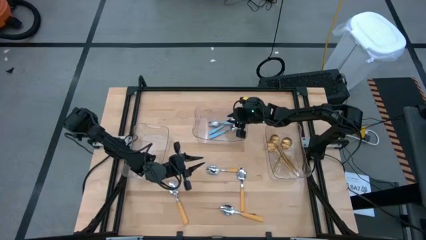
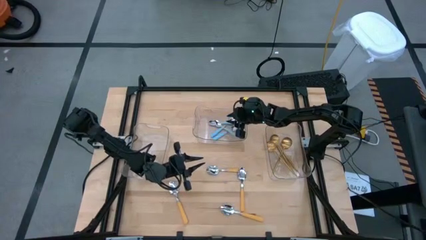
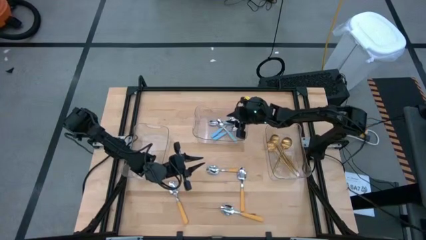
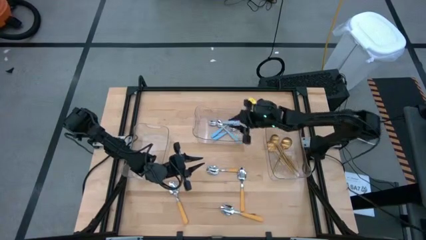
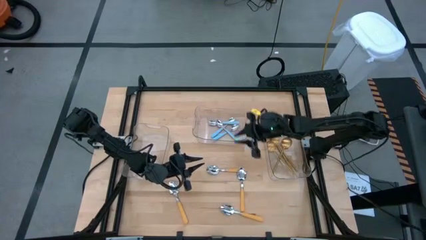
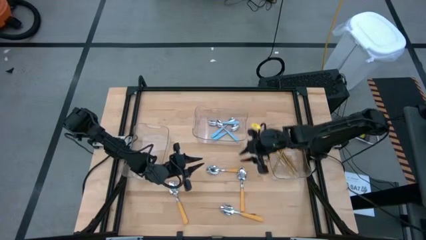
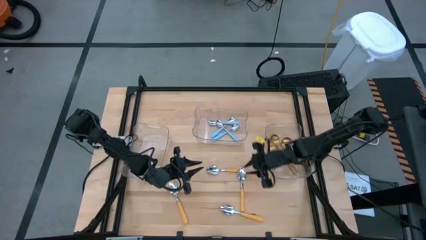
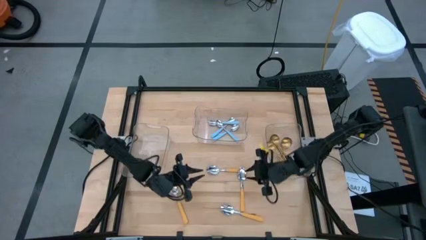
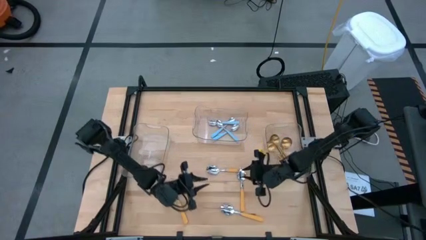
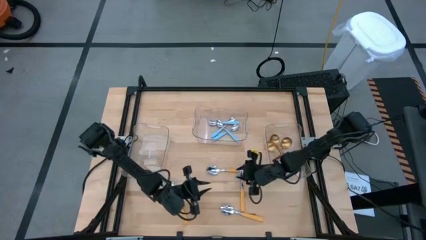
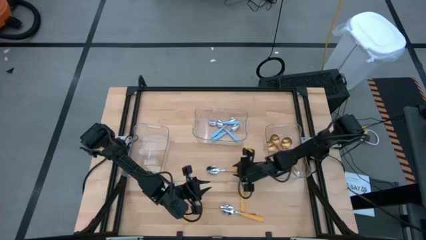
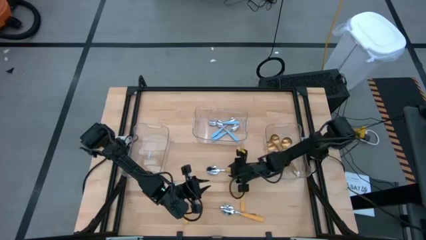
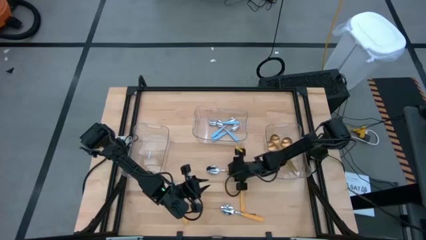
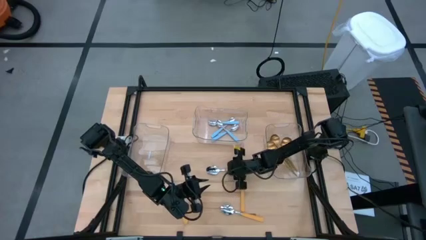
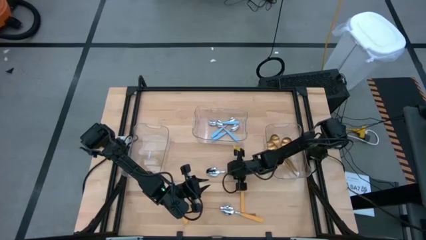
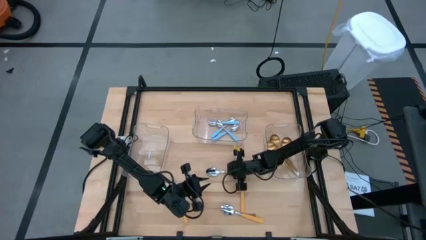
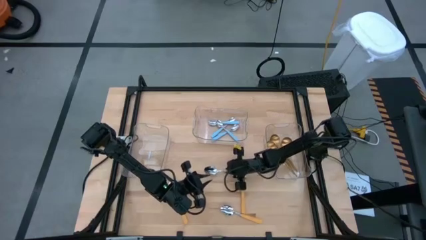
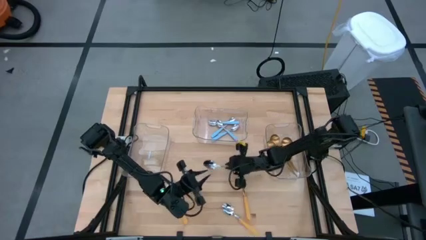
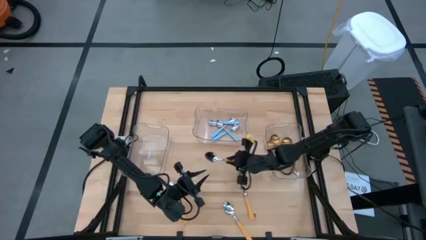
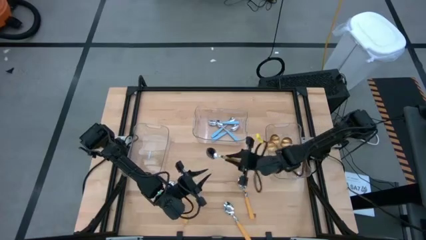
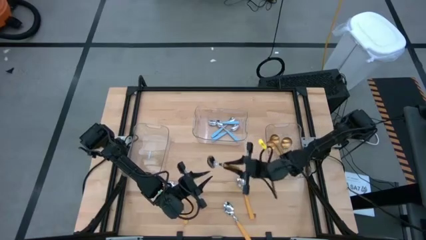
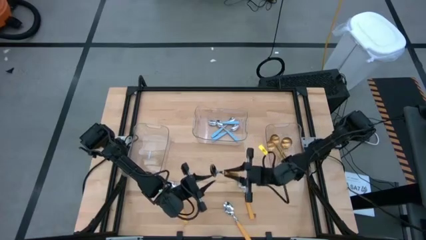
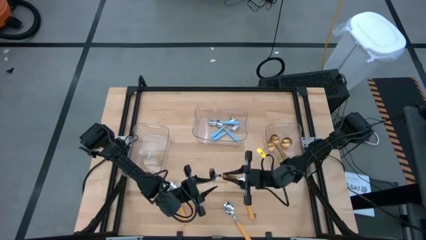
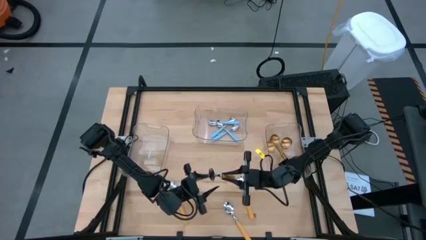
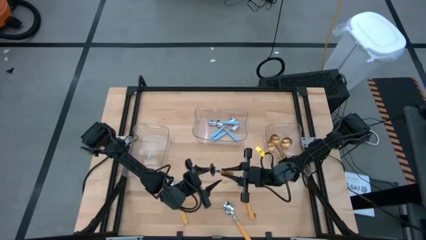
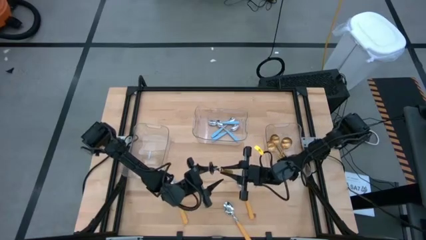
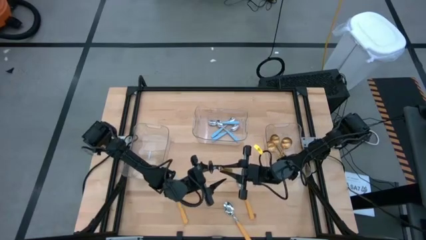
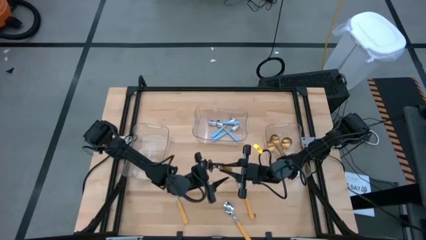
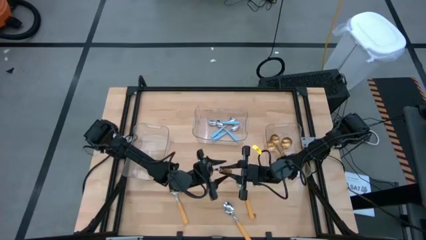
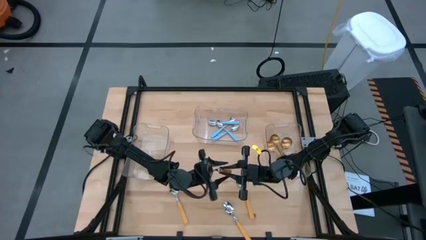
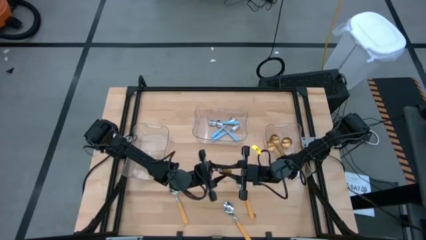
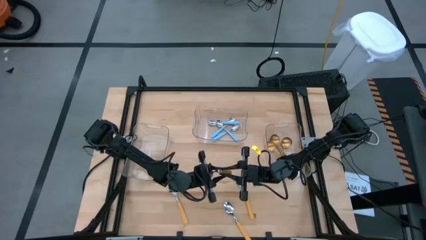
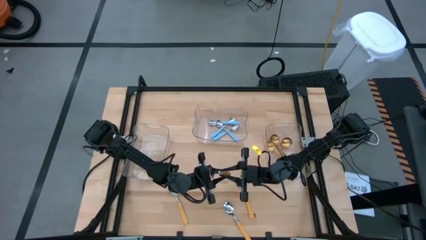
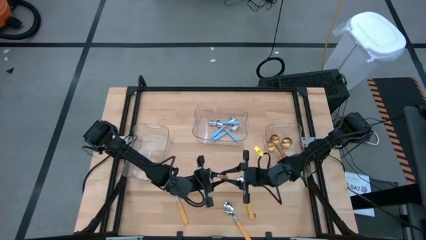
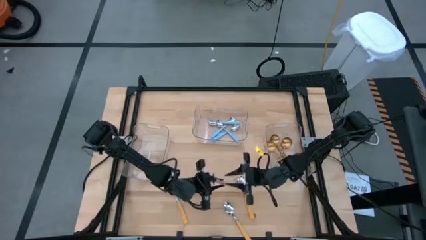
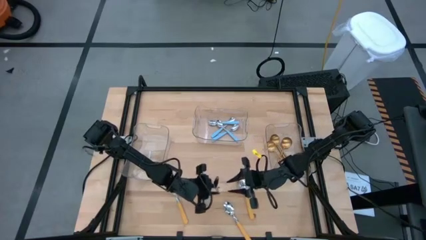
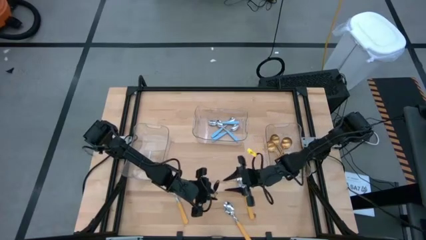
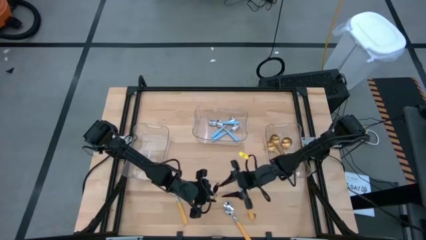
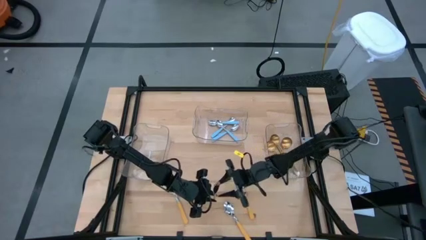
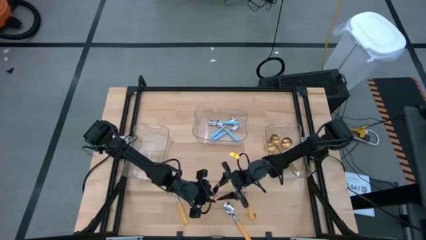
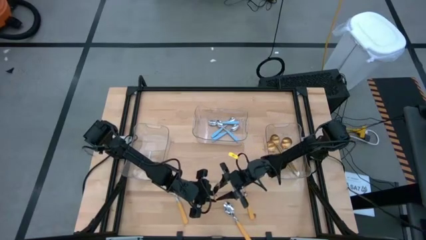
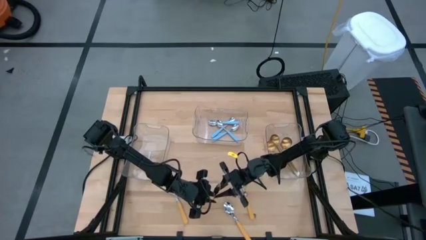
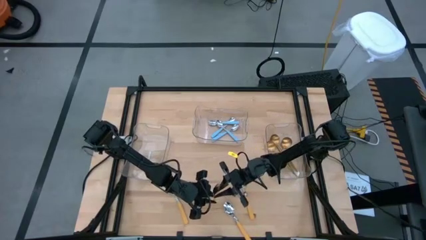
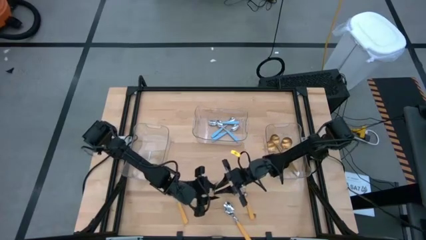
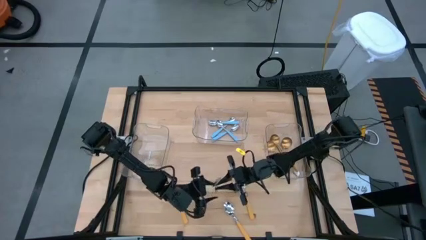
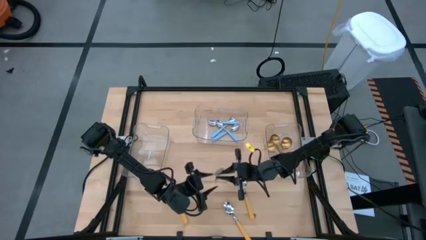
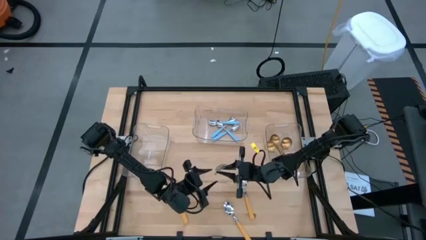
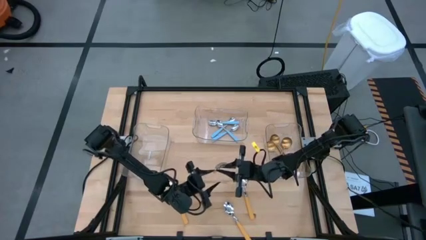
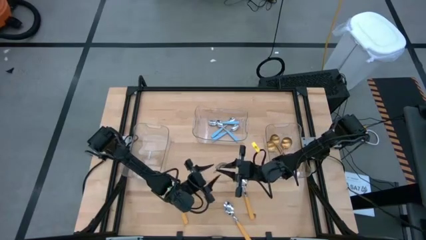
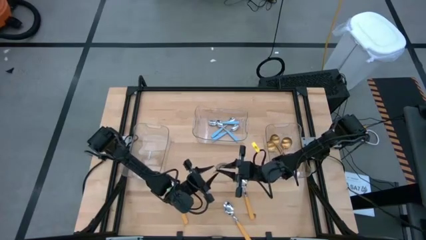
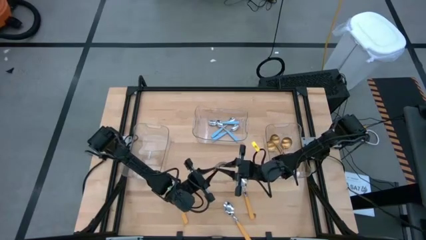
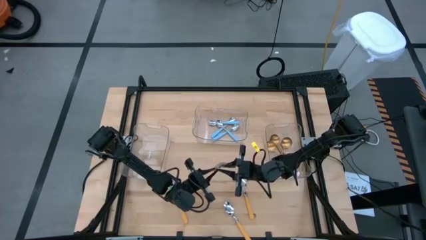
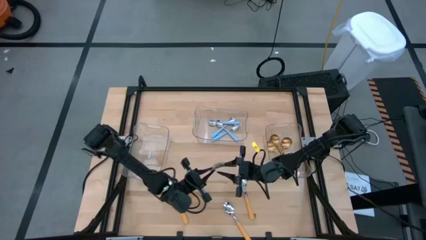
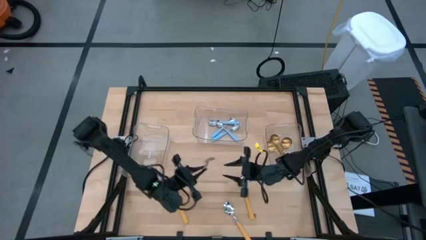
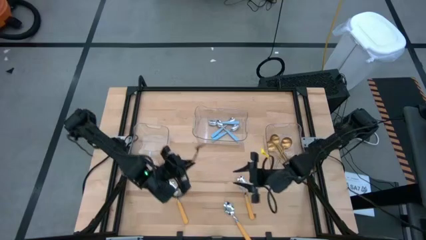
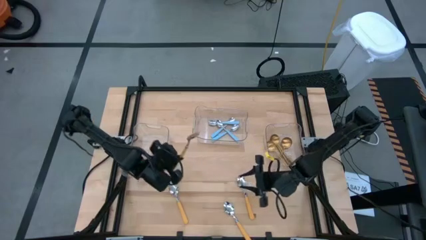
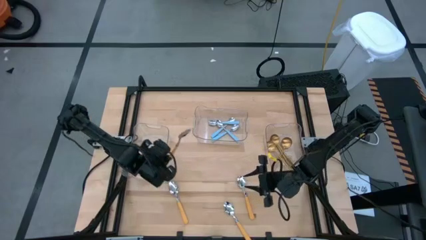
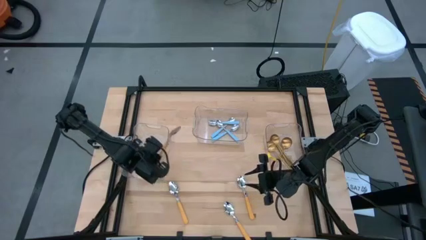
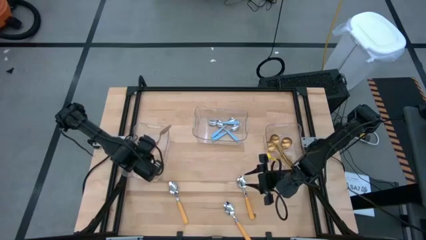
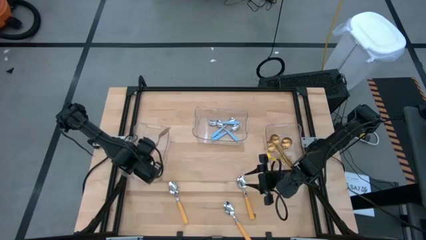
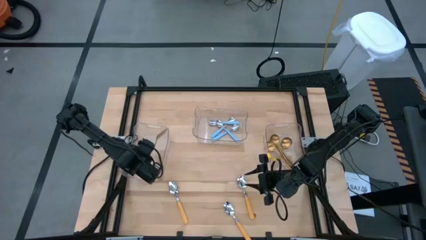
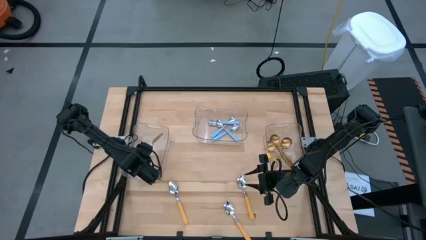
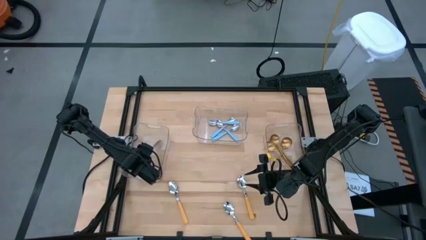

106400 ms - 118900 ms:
Task: Sort silverware by color (type)
Put the yellow spoon into the left transparent bin
